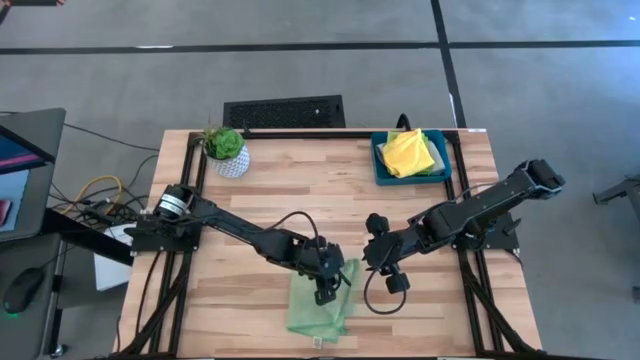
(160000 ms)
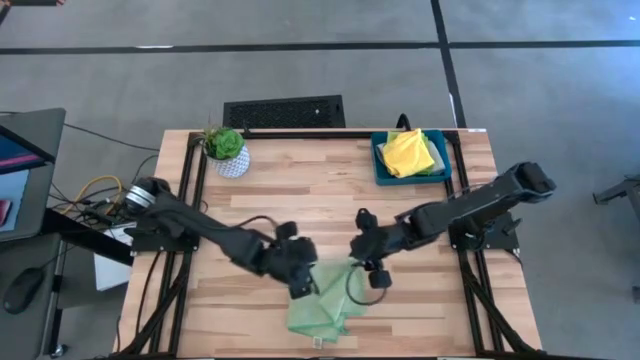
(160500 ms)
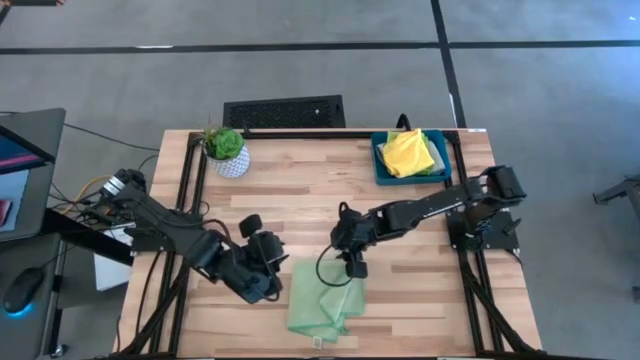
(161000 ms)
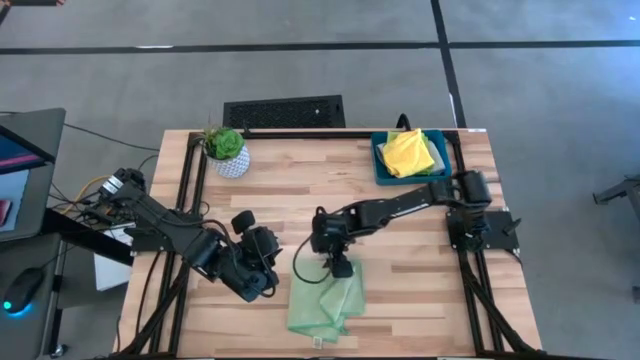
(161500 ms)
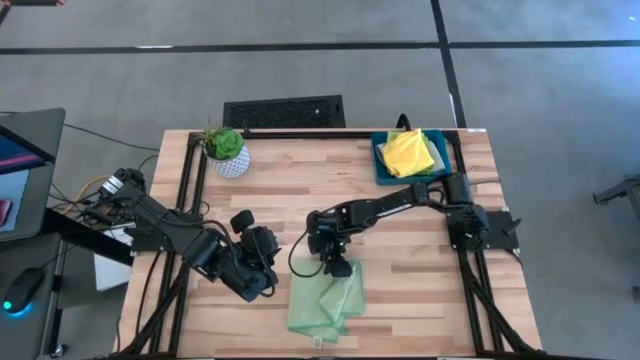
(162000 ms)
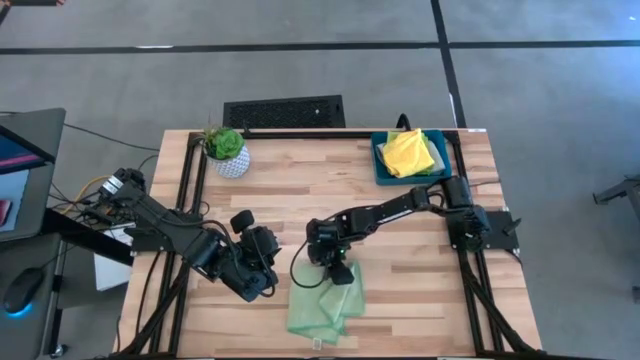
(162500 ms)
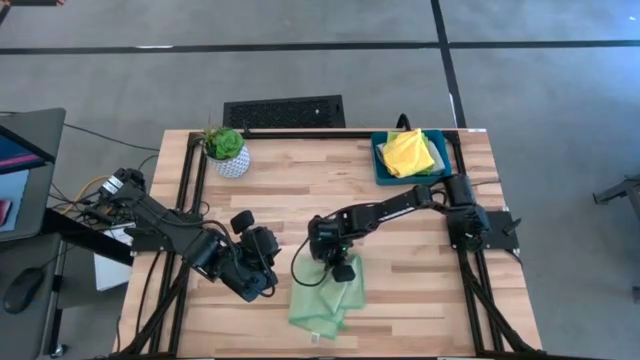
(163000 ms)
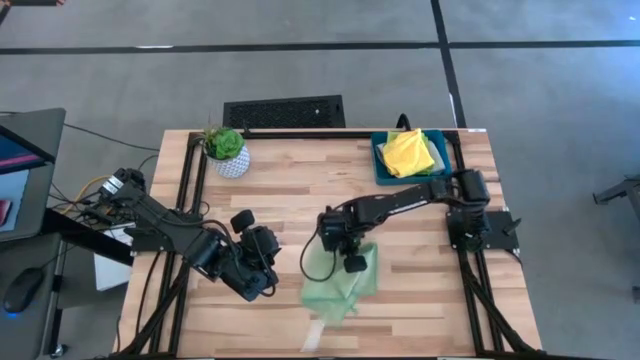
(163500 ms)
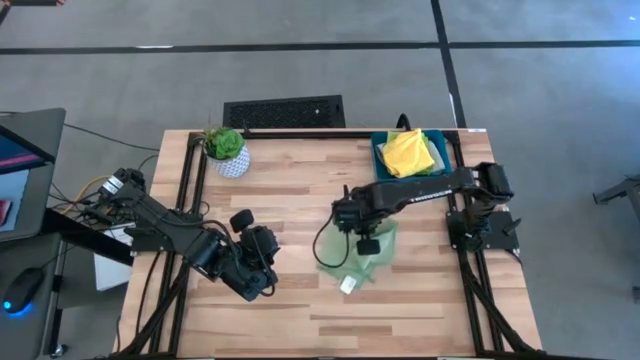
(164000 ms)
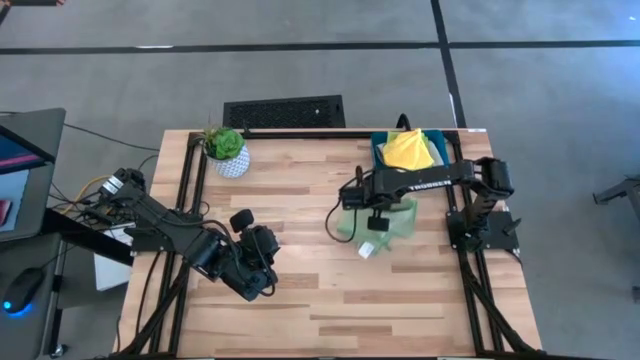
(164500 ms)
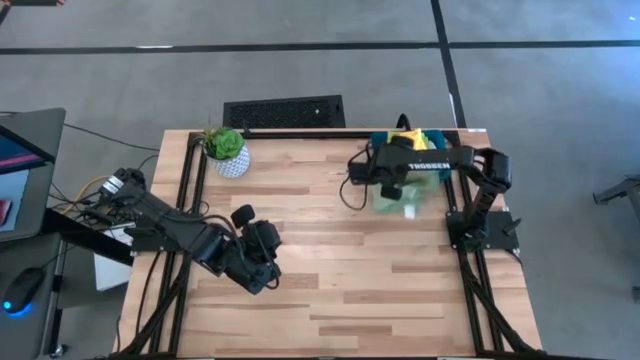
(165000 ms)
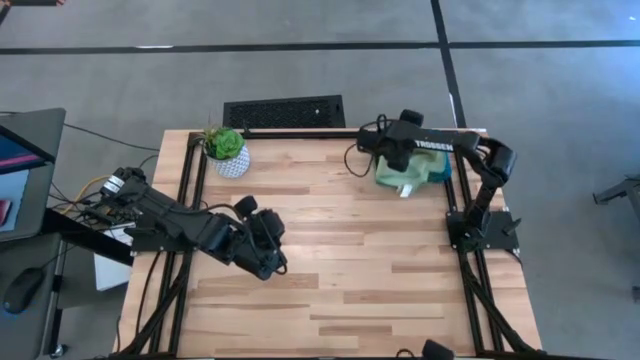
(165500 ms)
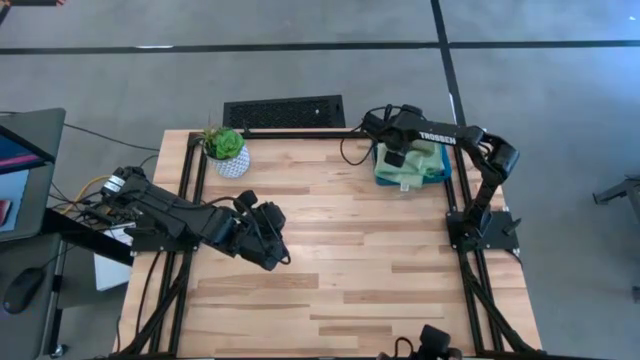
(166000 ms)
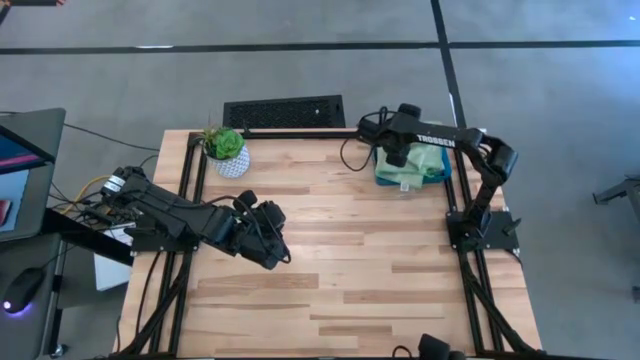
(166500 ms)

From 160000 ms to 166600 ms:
Task: Fold microfiber towels
Put the green microfiber towel into the blue bin

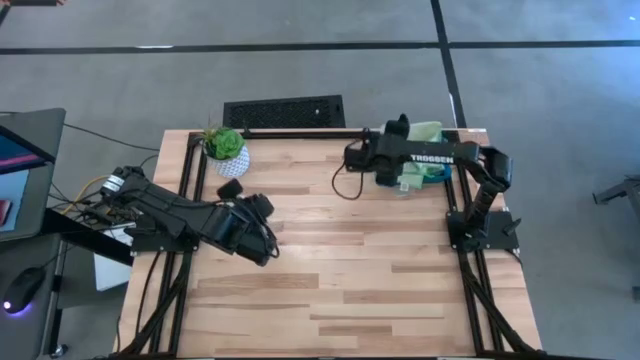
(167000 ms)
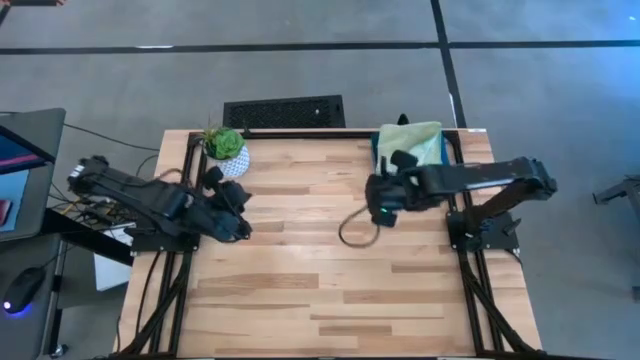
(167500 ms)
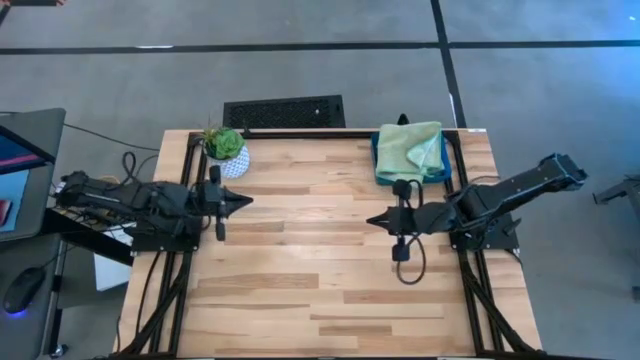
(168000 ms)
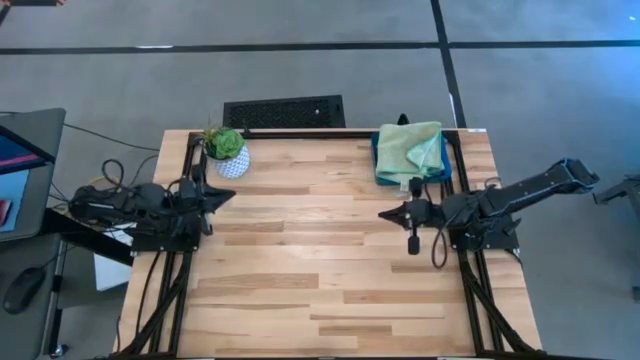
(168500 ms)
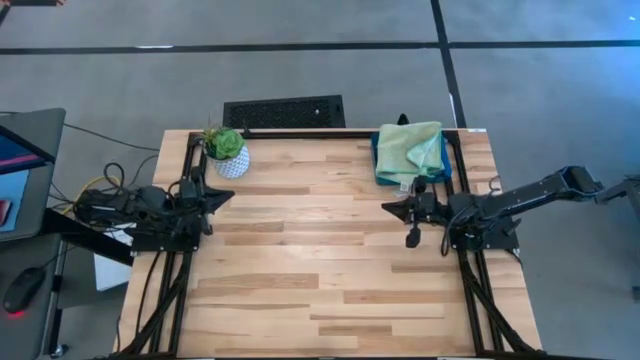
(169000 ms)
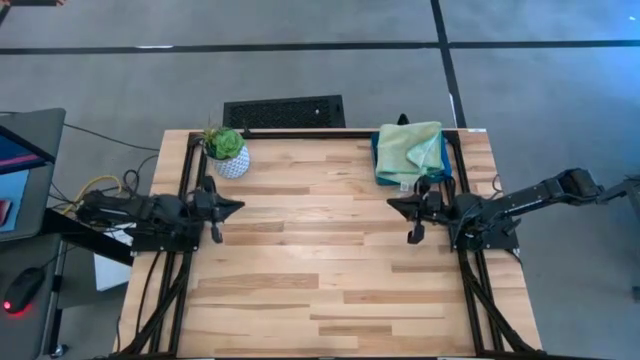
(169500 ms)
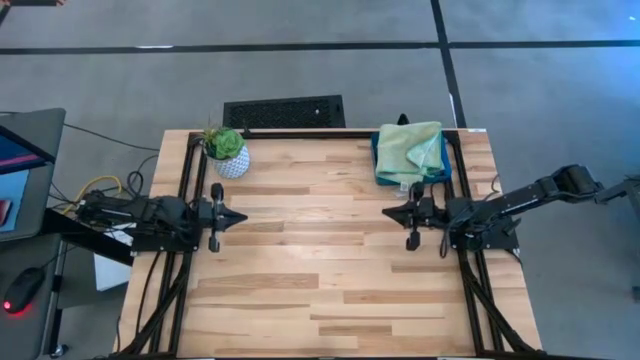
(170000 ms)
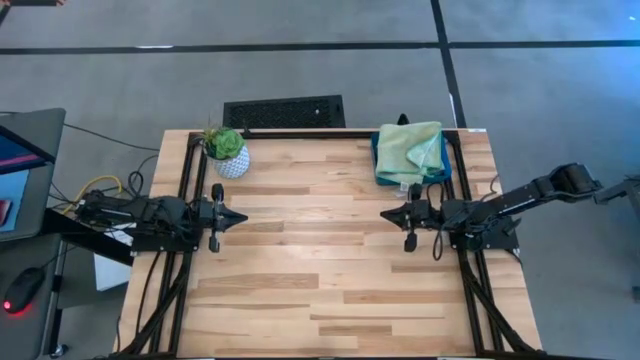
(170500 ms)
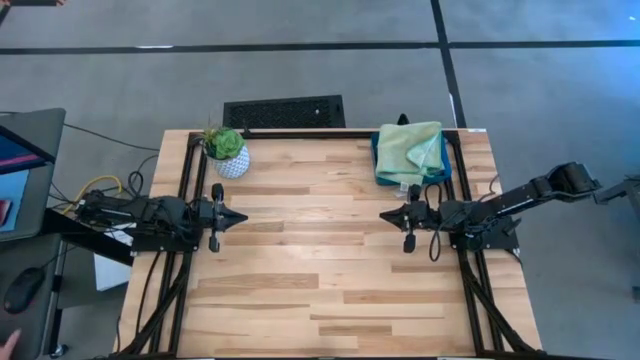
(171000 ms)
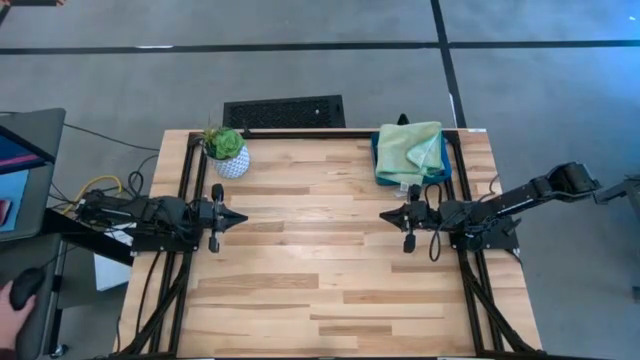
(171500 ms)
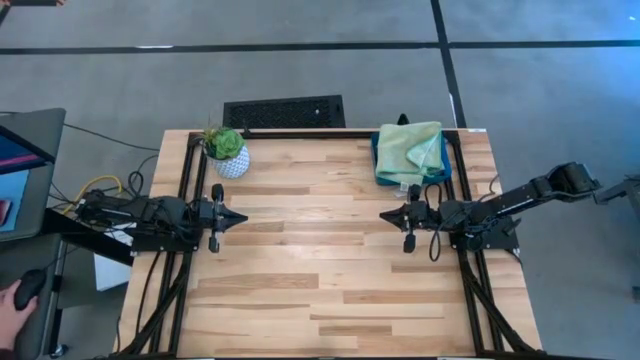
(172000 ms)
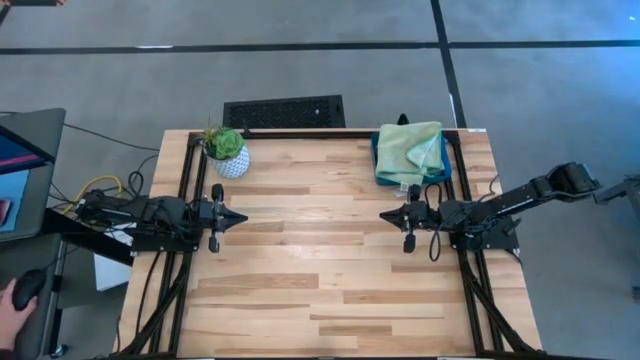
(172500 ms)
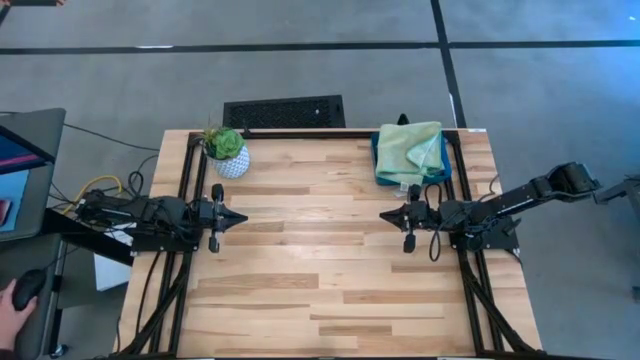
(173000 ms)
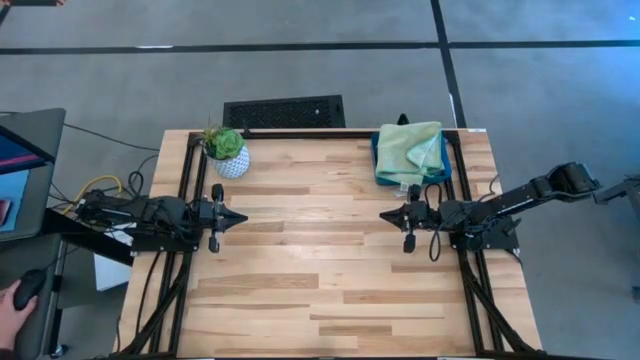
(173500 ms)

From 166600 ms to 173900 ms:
Return to Home Position

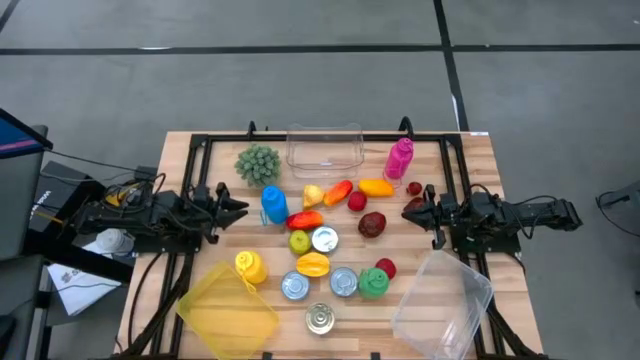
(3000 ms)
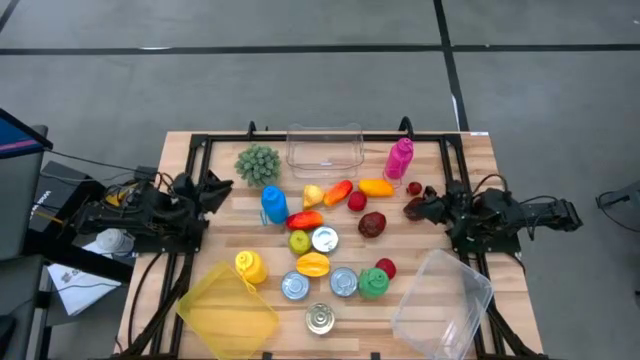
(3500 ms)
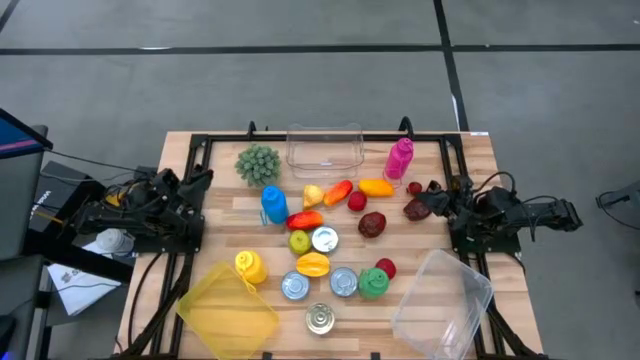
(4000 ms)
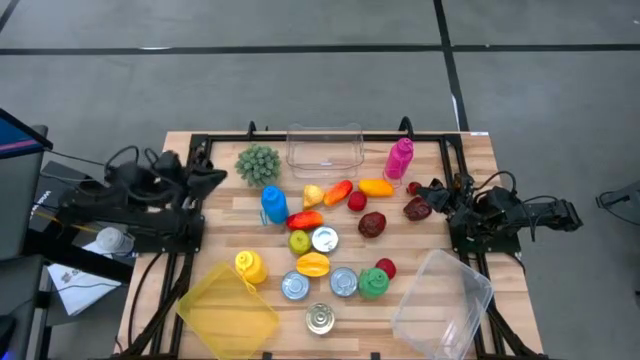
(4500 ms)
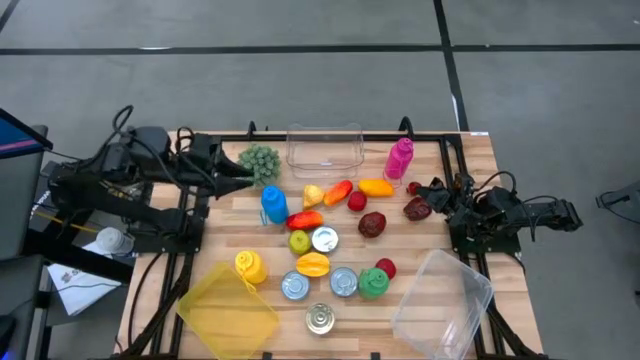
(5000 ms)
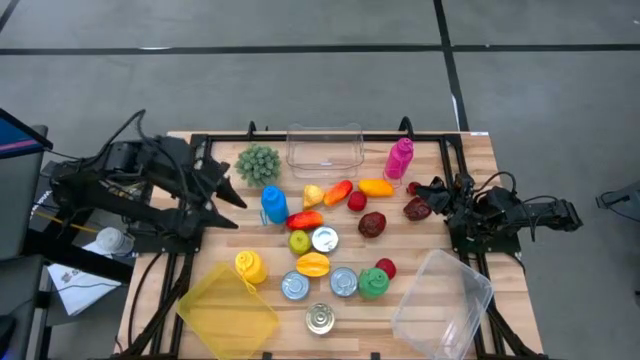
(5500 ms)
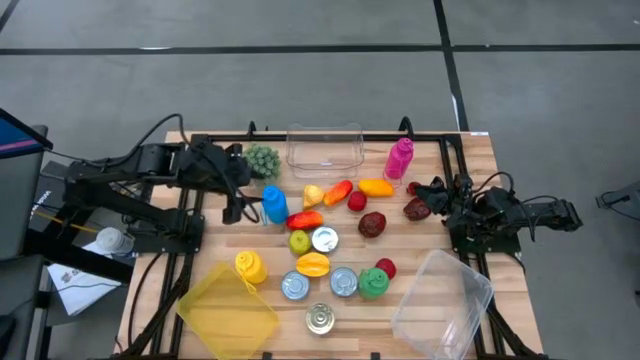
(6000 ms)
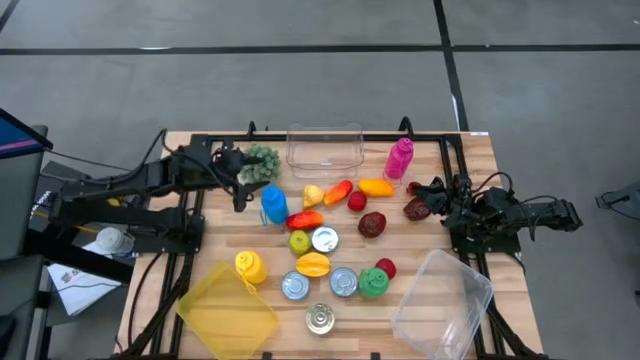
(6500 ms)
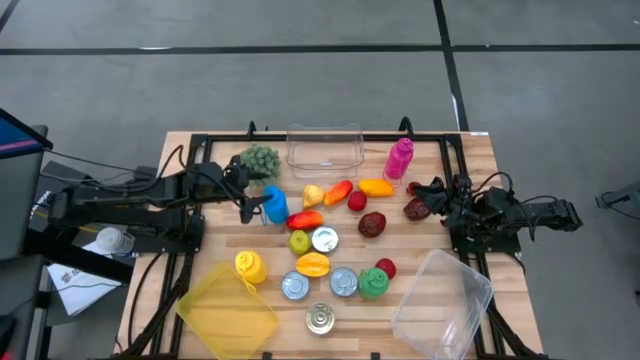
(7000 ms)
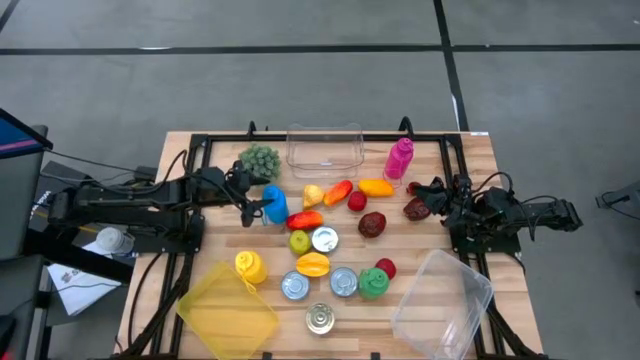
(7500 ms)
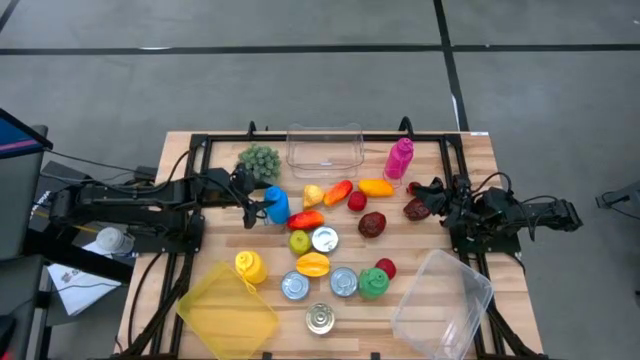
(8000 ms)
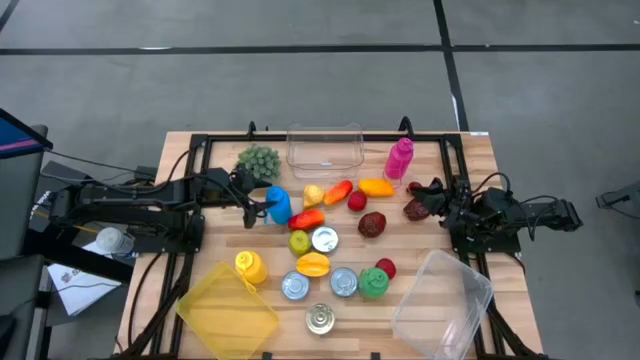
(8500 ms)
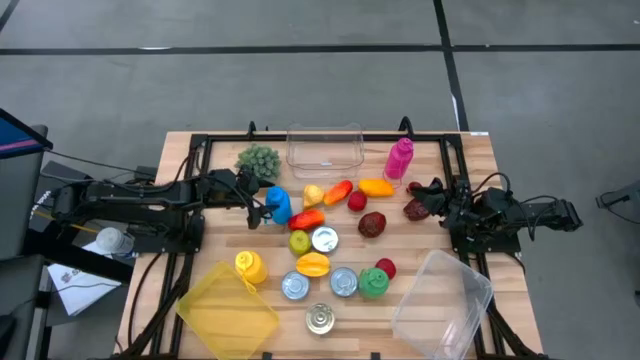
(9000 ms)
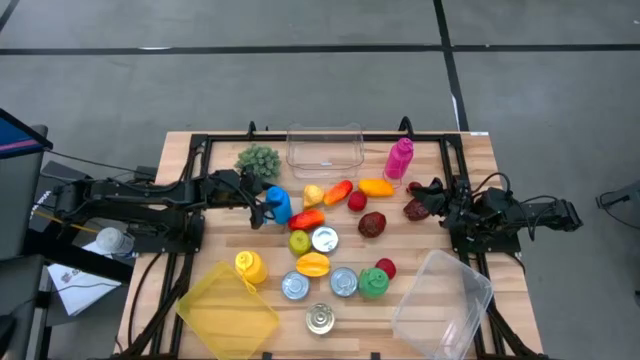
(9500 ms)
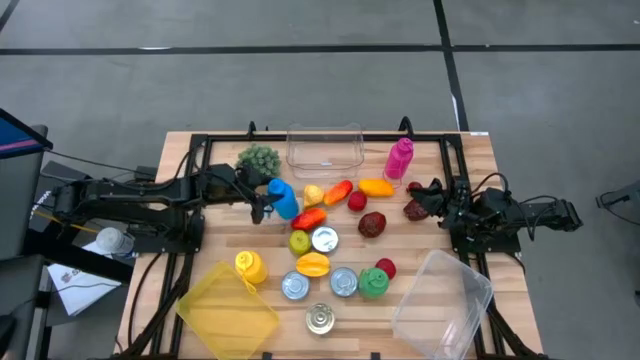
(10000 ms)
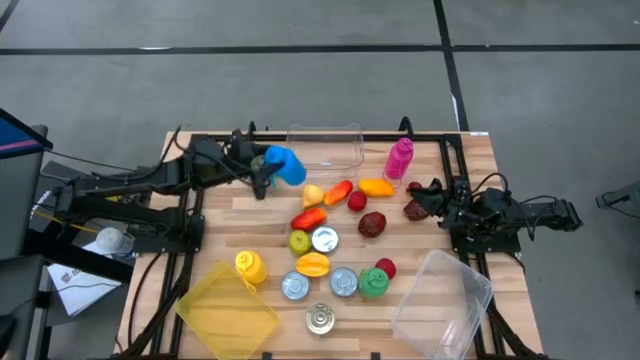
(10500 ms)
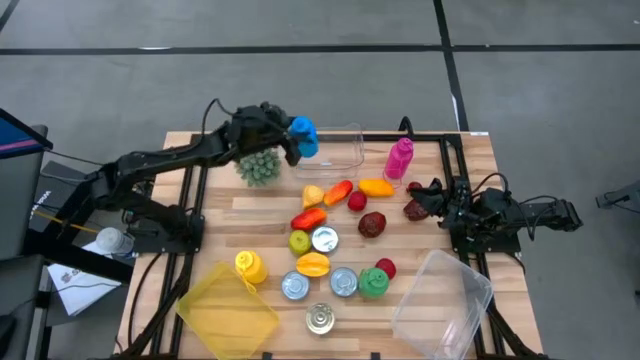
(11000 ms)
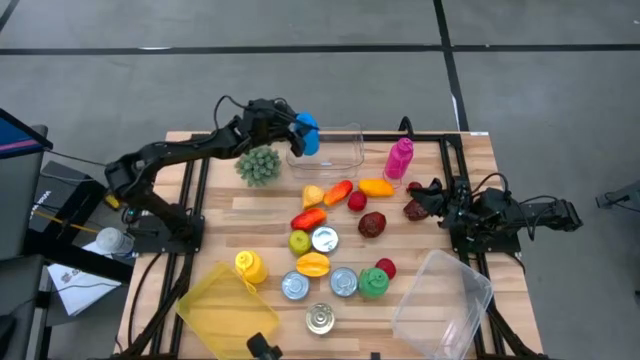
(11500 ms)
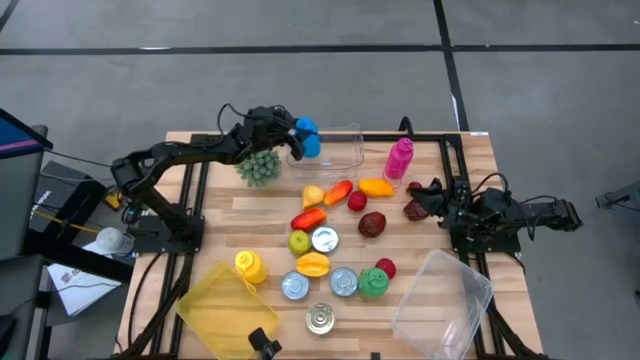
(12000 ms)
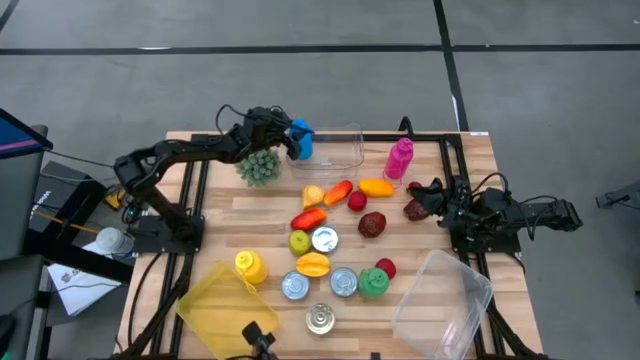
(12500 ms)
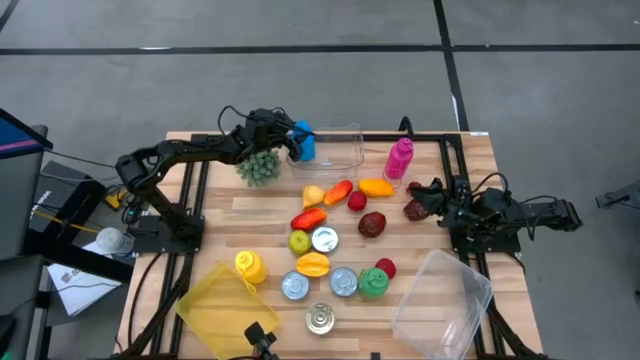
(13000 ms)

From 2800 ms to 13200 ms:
Task: Pick & Place Food Item
Put the blue water bottle into the transparent bin
